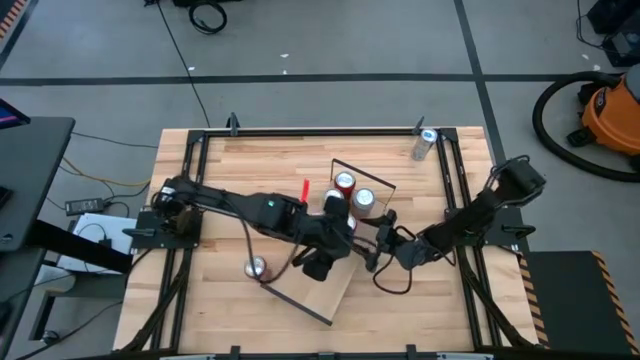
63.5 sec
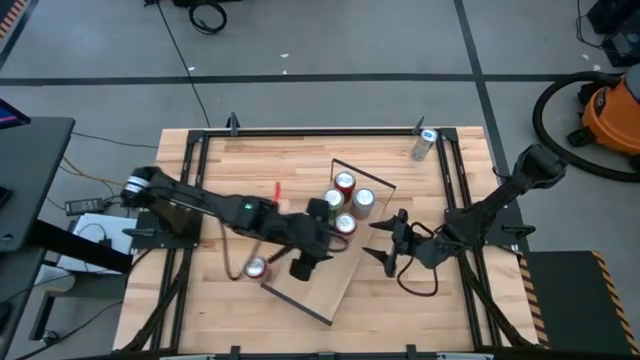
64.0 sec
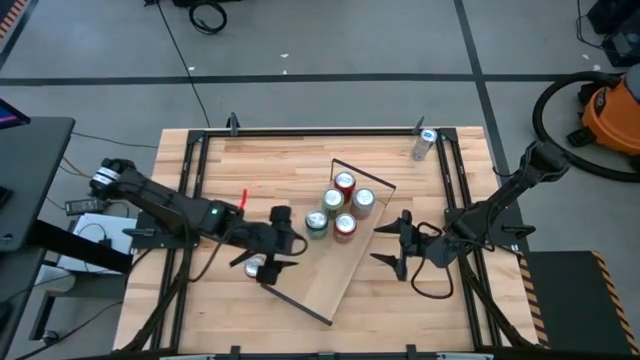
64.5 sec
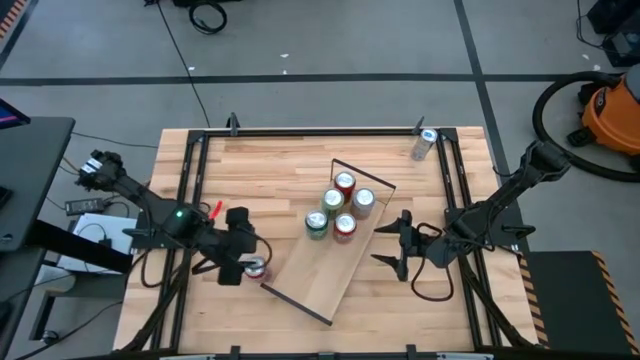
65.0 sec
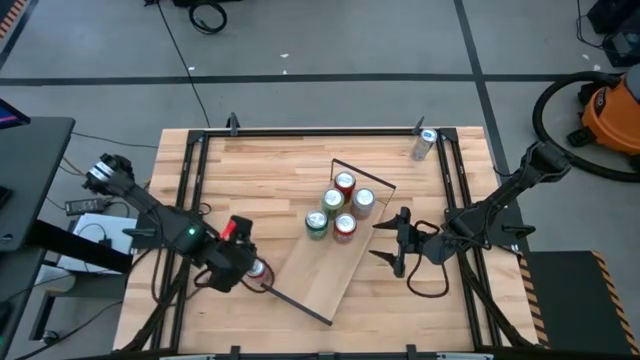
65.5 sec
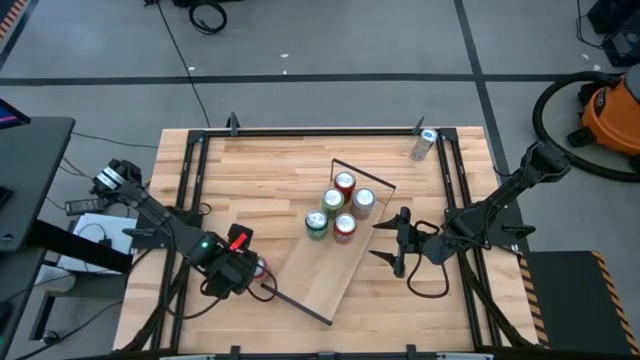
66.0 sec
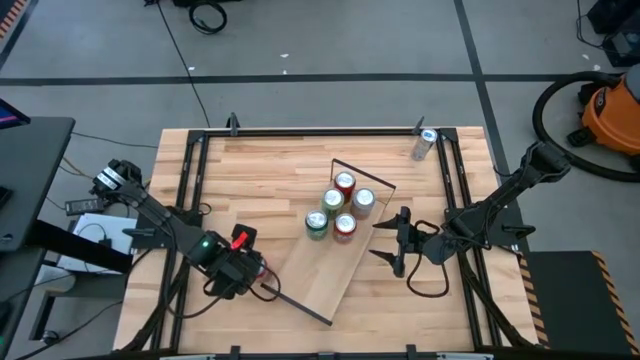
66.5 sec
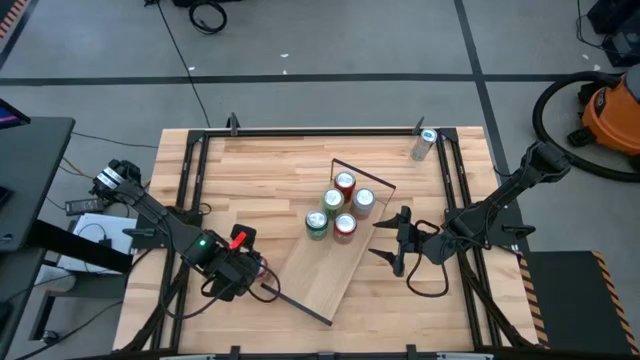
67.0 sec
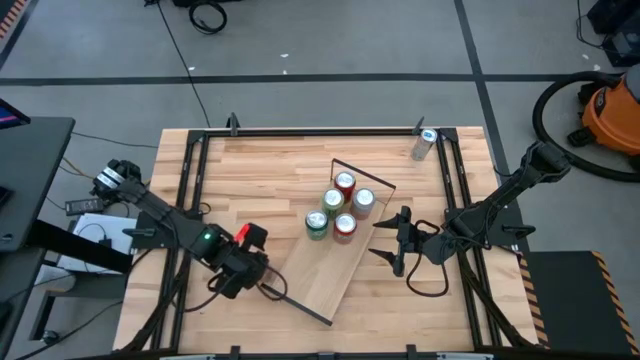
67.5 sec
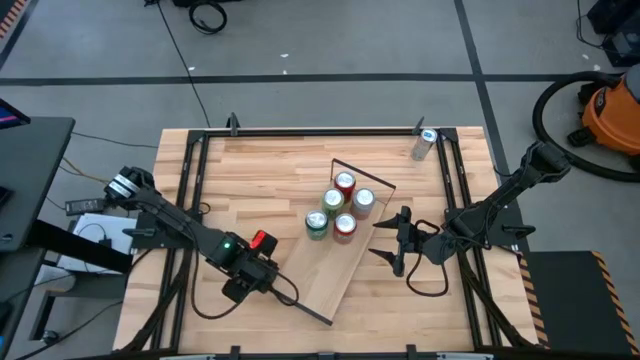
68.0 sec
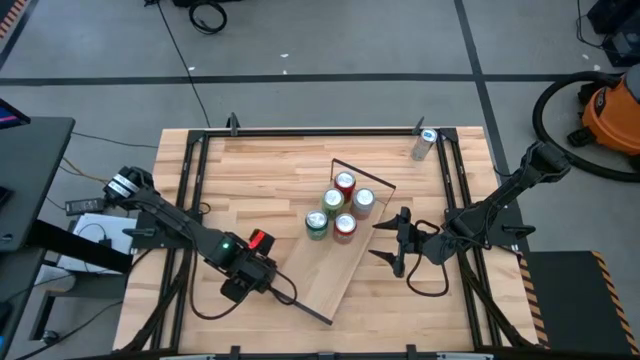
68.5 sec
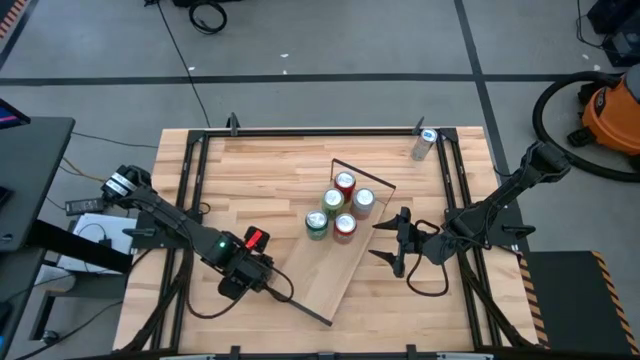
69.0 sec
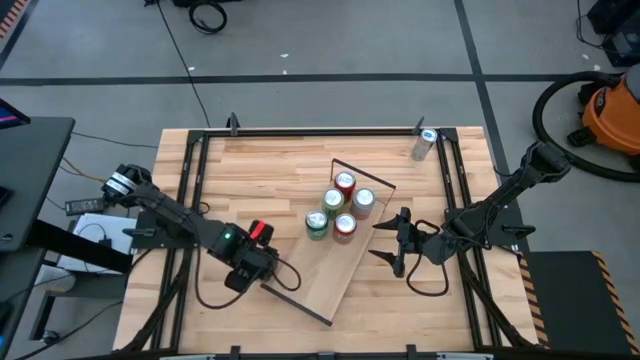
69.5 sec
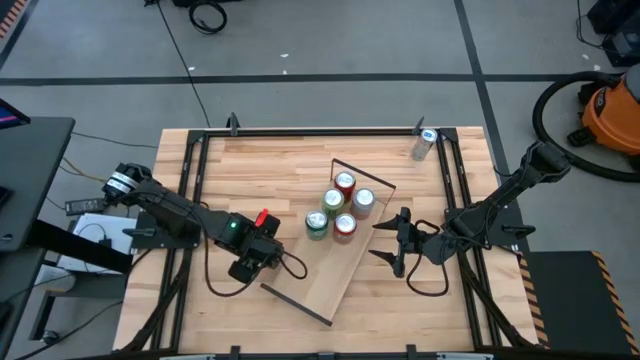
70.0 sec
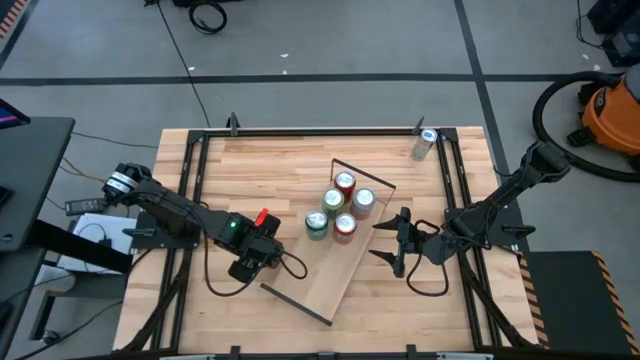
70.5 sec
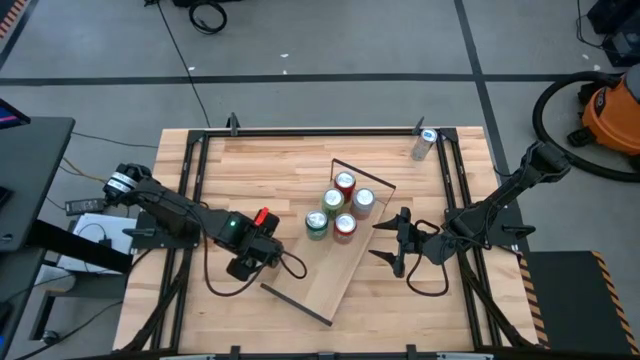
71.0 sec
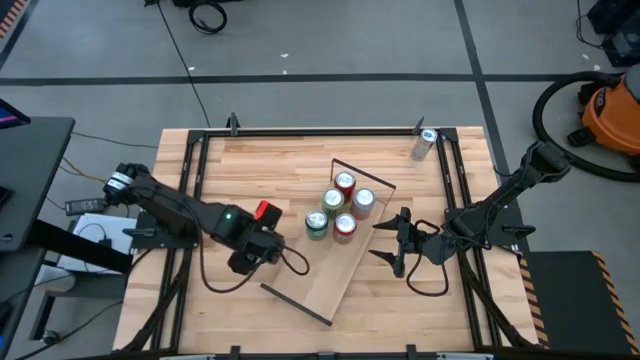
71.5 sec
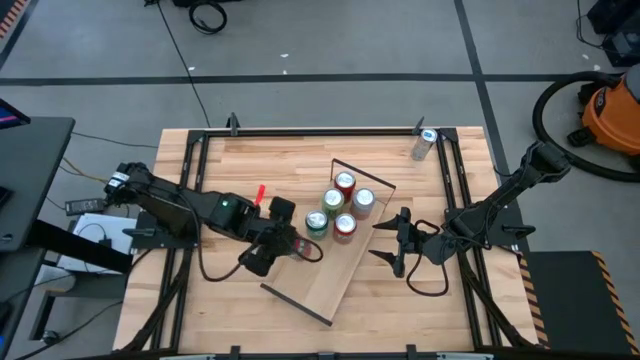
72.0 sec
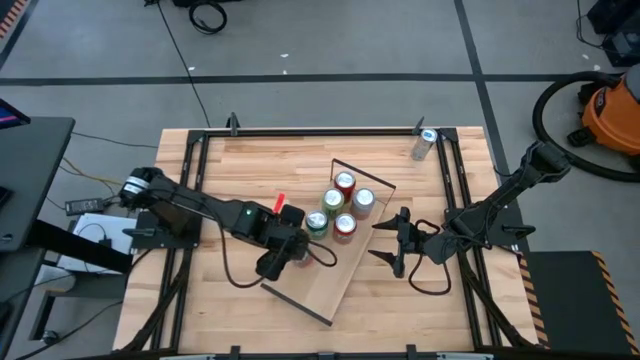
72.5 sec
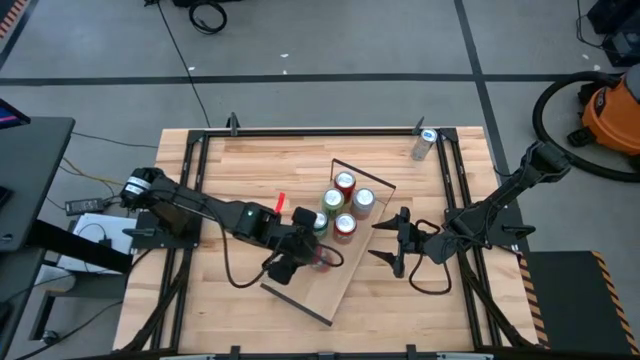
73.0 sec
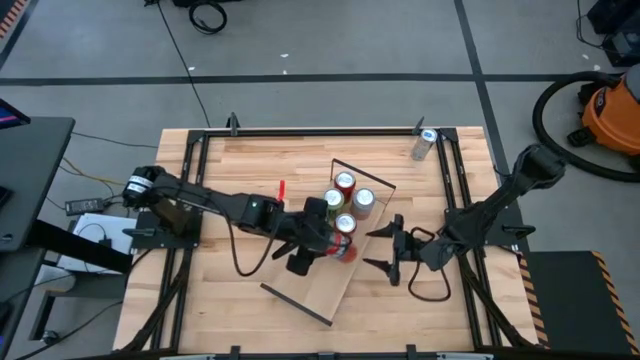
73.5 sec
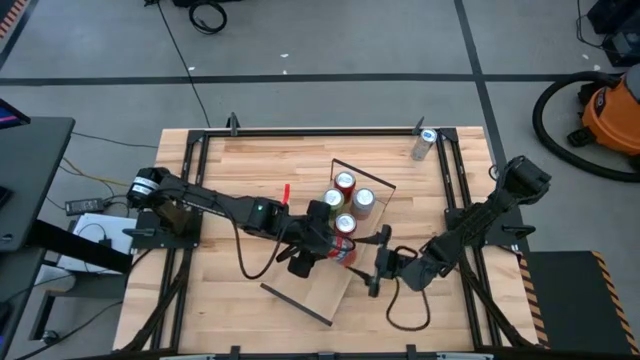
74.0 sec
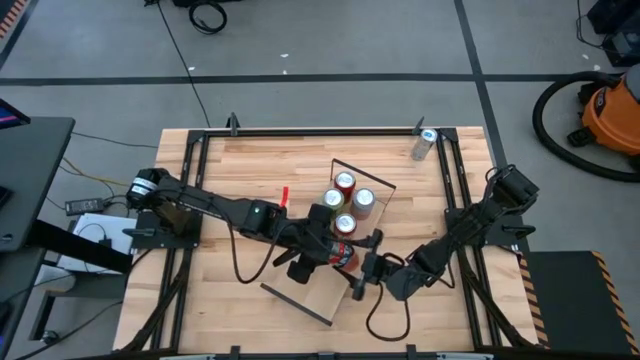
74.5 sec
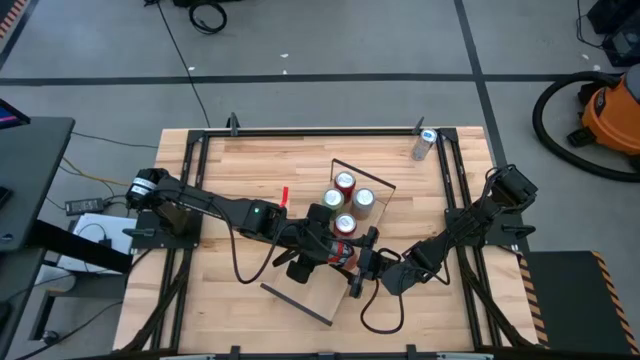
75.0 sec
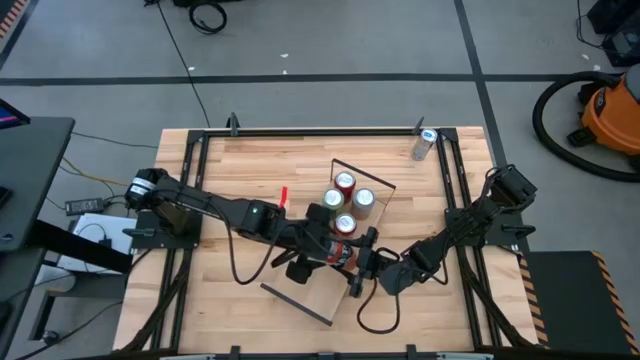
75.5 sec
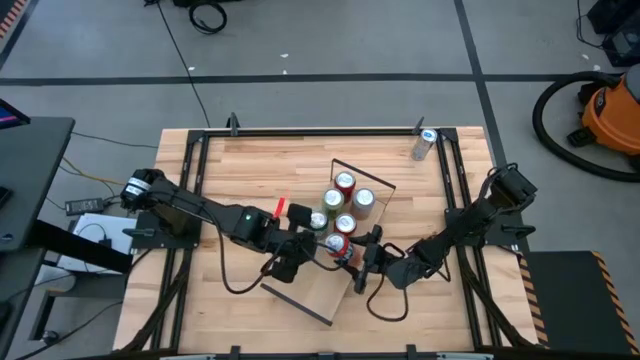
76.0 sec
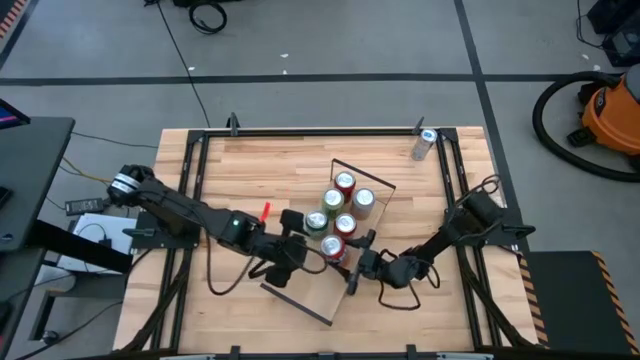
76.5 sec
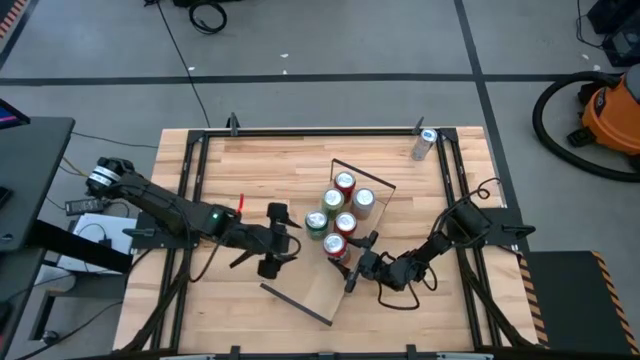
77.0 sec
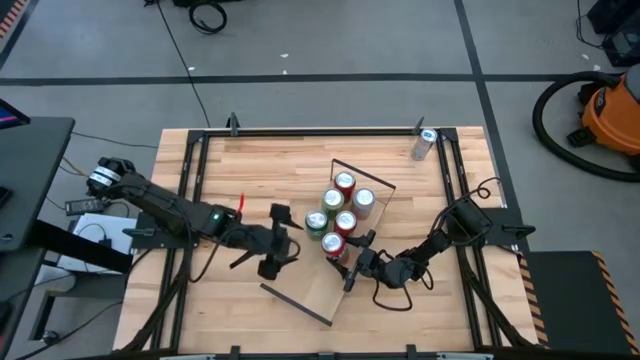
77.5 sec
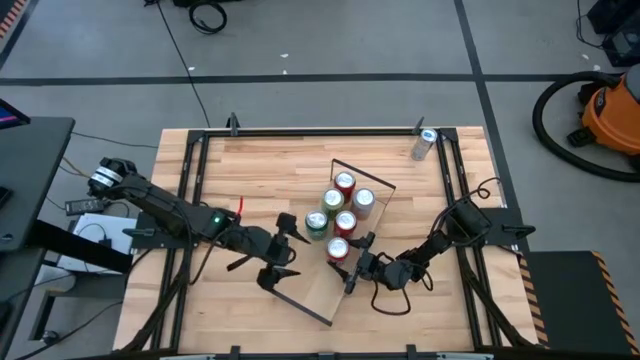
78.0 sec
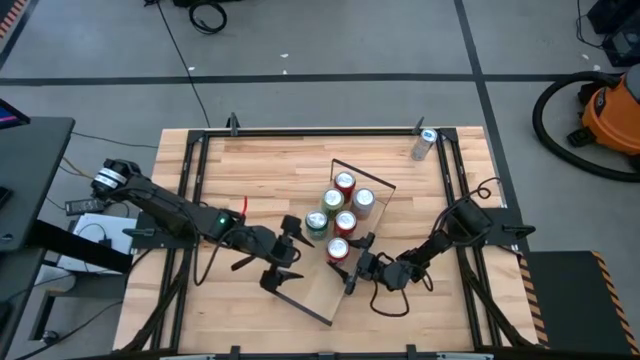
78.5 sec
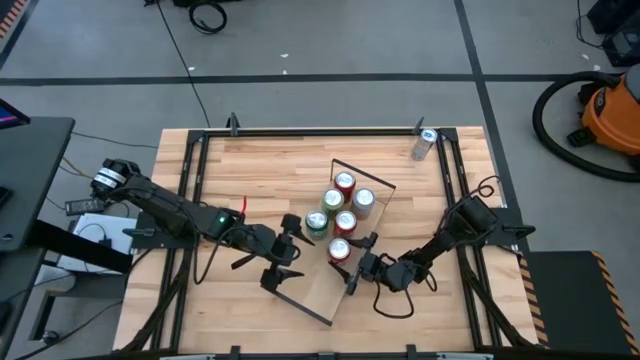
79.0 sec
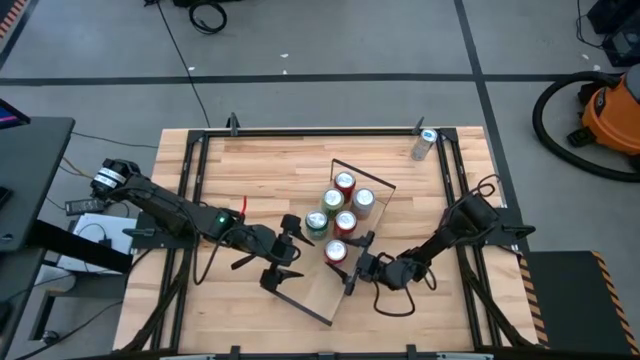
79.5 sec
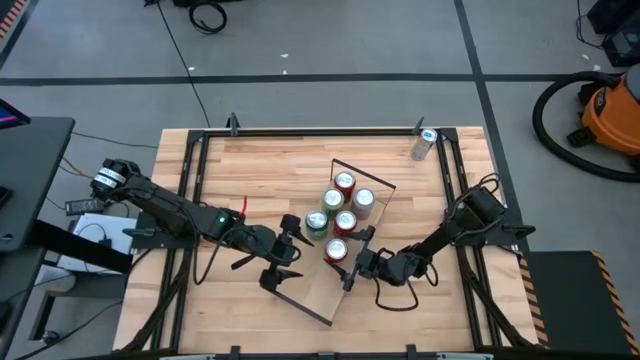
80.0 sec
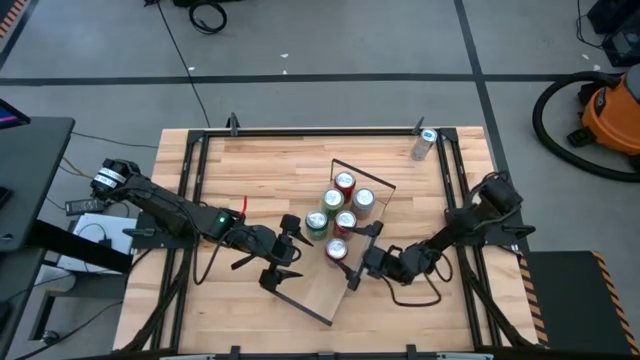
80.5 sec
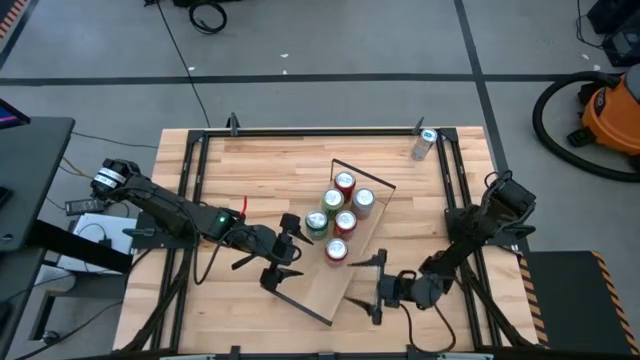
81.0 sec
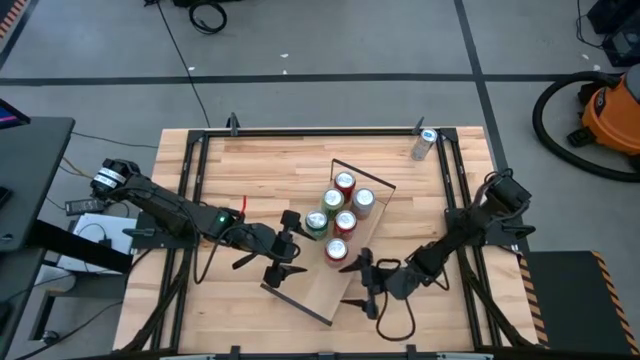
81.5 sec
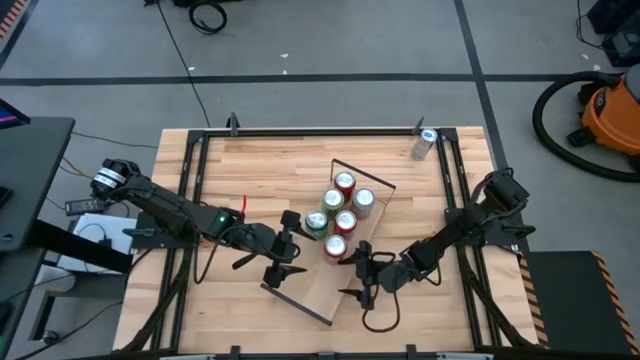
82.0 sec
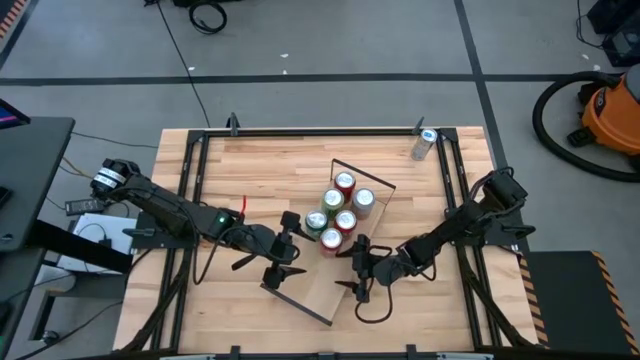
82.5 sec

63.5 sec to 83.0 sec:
Task: Place canned beverage on shelf
Put the red soda can on the shelf

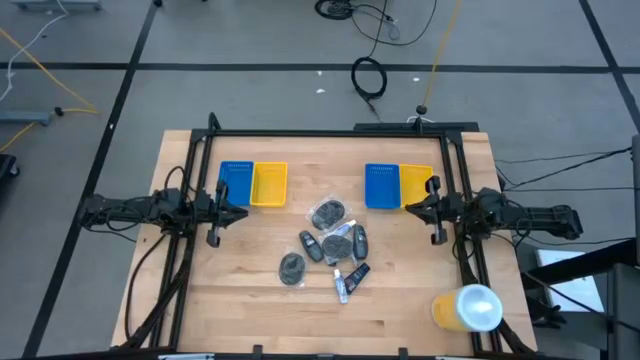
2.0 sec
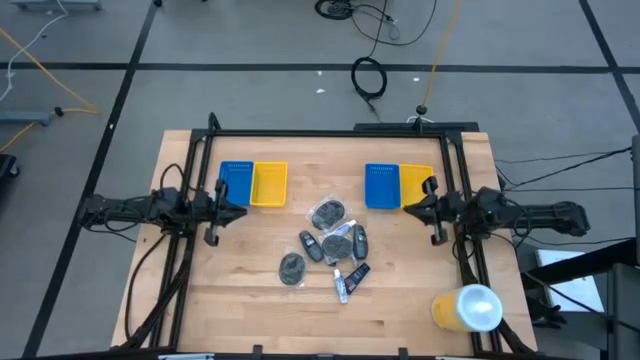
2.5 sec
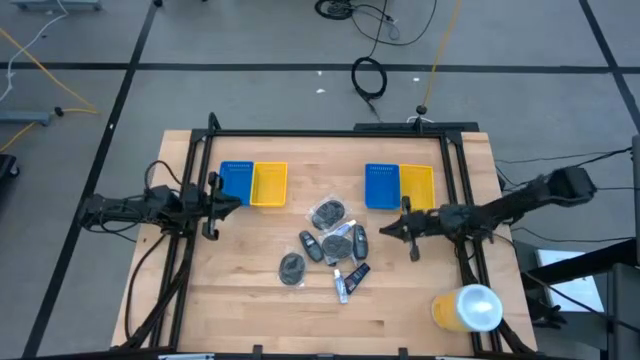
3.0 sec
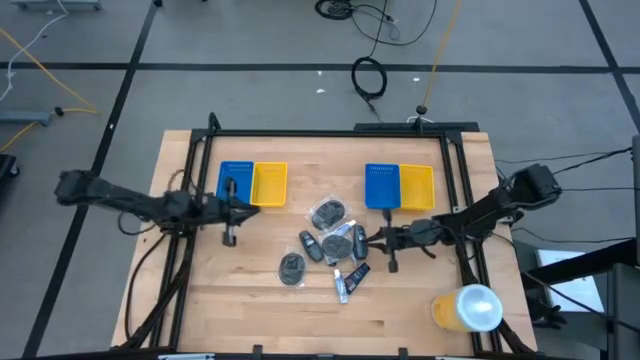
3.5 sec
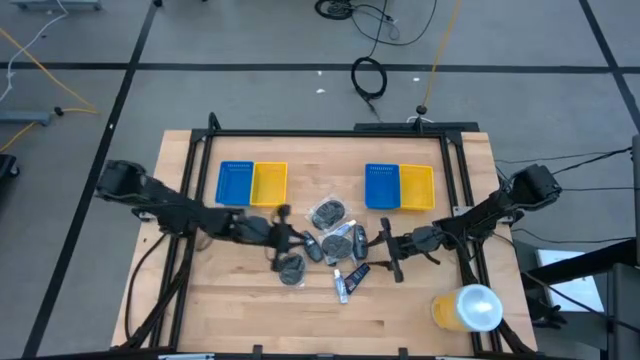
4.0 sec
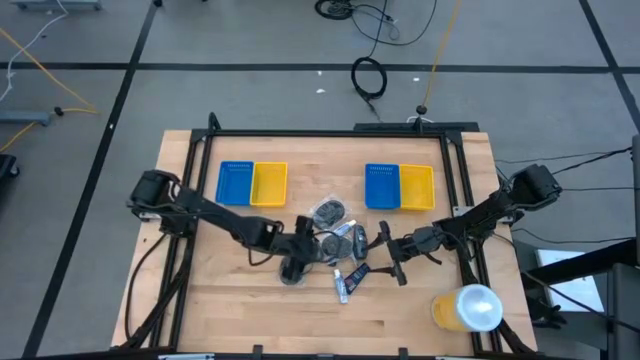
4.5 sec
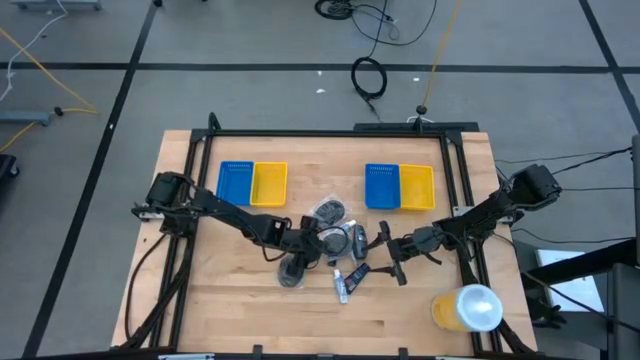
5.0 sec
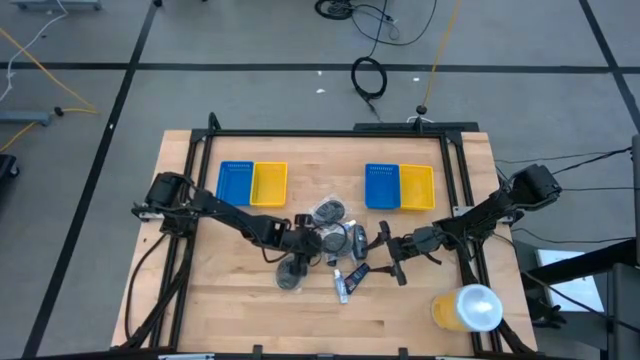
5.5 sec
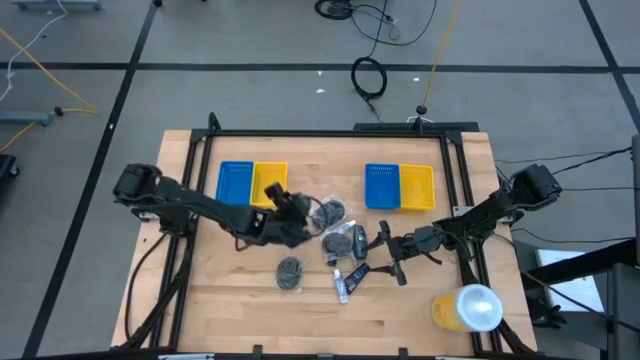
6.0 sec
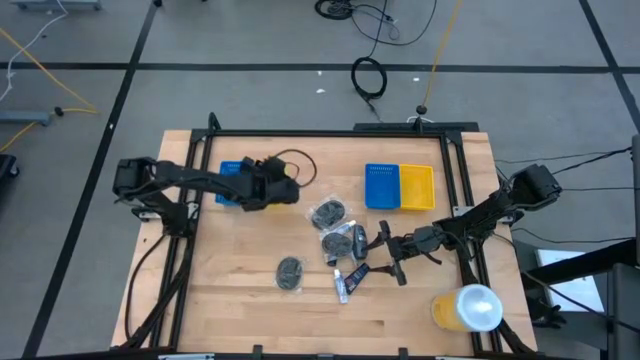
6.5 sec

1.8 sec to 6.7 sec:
Task: Pick & Place Travel size toiletries
Put the gray deodorant into the left yellow bin
